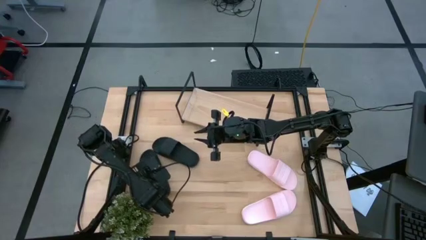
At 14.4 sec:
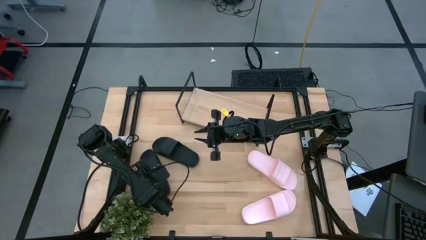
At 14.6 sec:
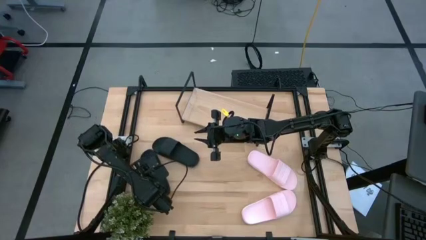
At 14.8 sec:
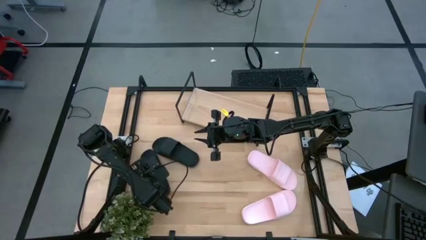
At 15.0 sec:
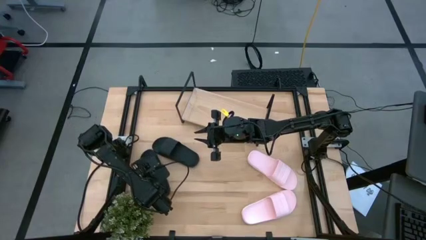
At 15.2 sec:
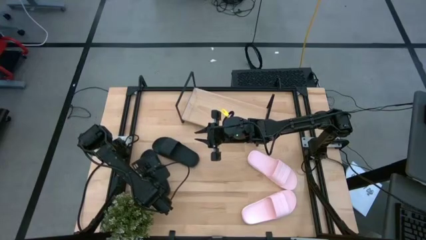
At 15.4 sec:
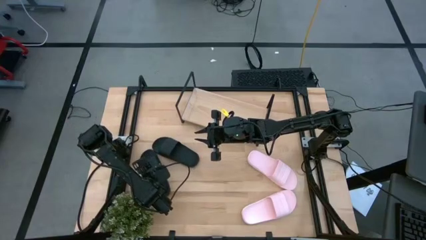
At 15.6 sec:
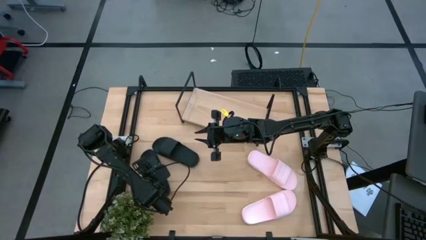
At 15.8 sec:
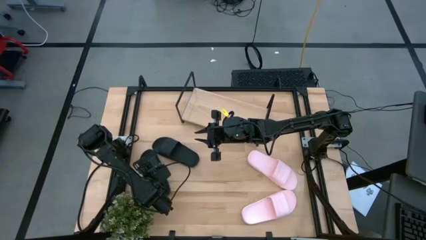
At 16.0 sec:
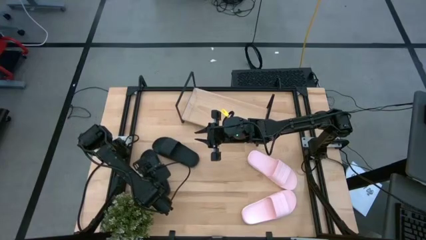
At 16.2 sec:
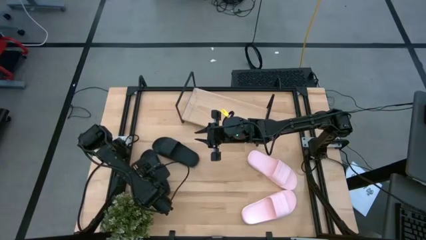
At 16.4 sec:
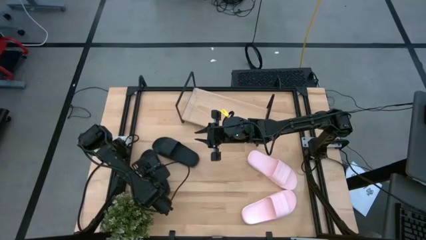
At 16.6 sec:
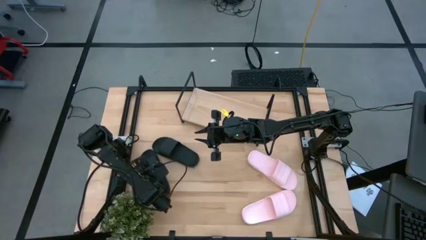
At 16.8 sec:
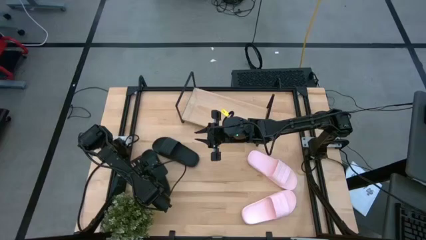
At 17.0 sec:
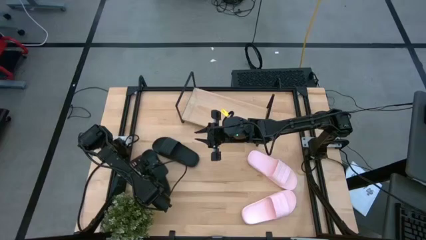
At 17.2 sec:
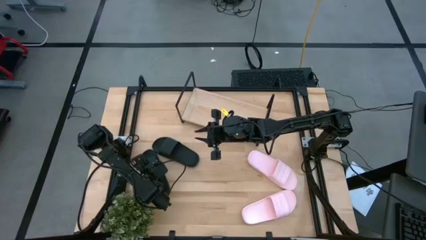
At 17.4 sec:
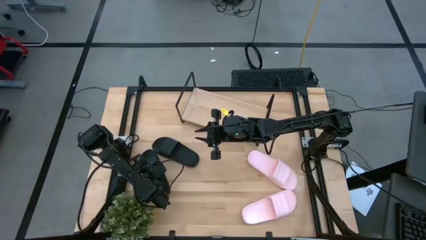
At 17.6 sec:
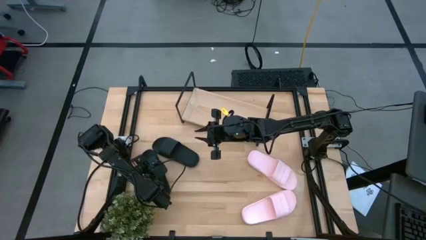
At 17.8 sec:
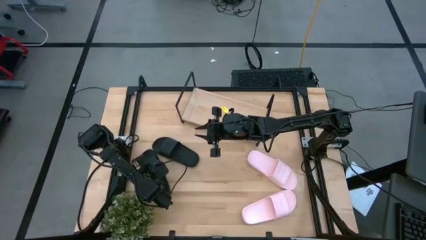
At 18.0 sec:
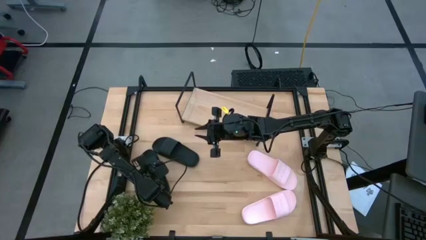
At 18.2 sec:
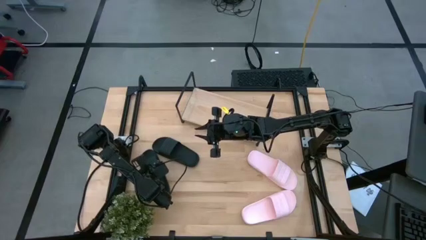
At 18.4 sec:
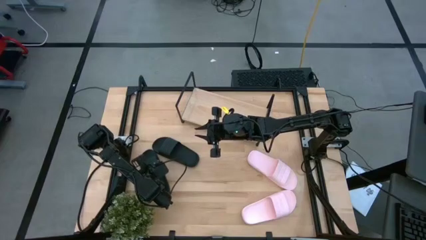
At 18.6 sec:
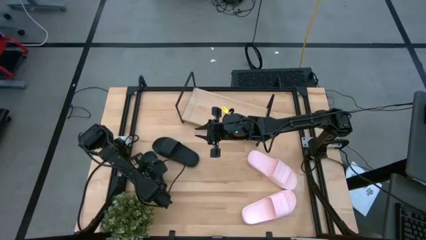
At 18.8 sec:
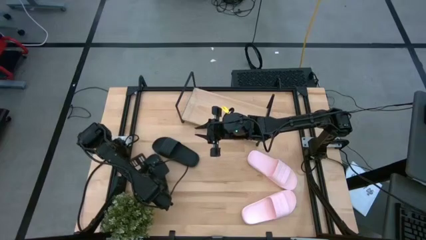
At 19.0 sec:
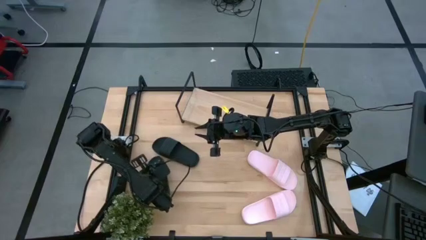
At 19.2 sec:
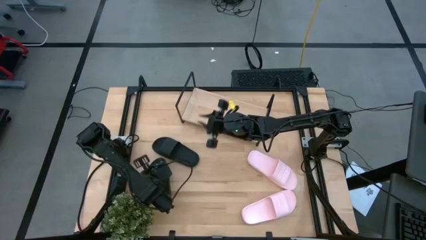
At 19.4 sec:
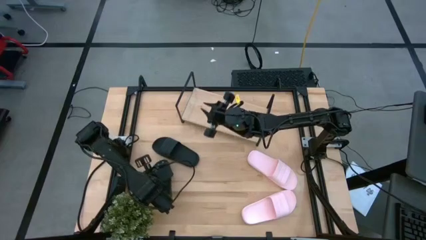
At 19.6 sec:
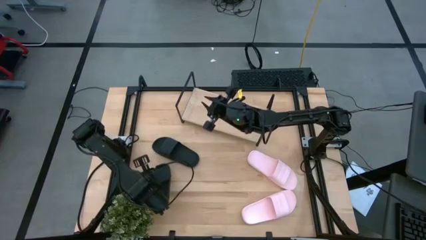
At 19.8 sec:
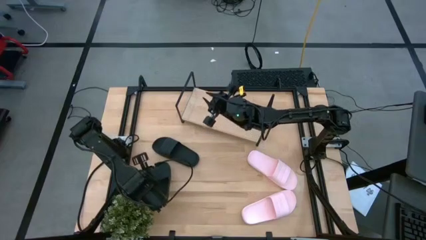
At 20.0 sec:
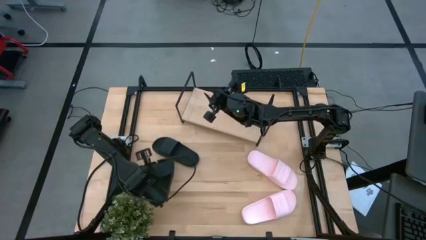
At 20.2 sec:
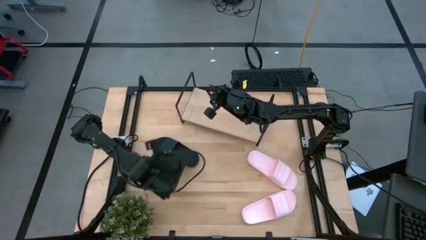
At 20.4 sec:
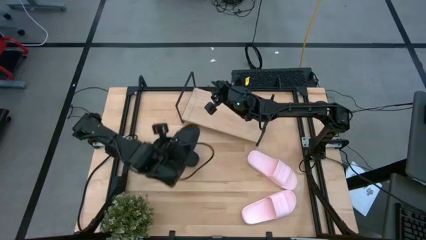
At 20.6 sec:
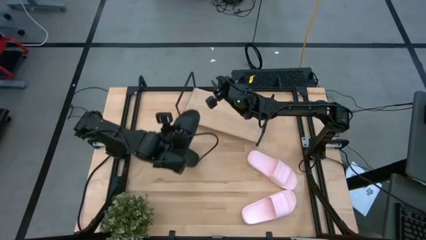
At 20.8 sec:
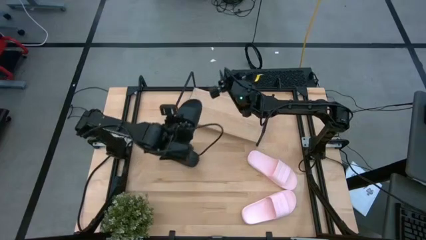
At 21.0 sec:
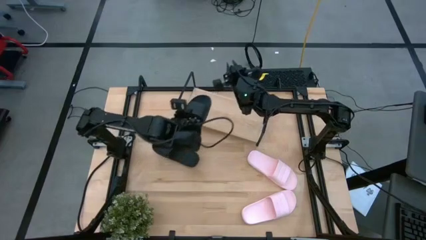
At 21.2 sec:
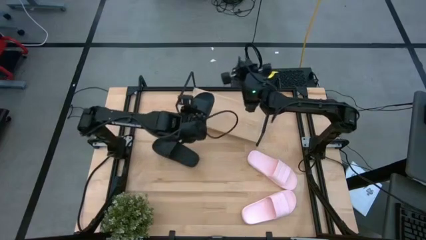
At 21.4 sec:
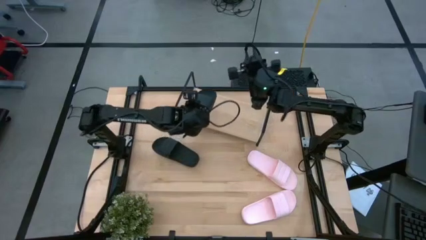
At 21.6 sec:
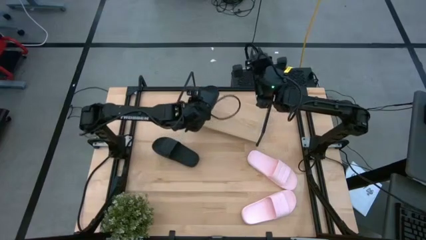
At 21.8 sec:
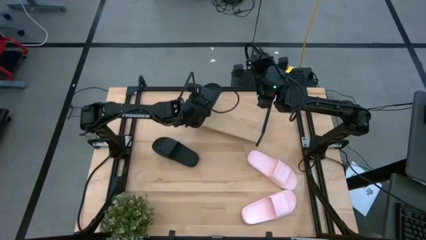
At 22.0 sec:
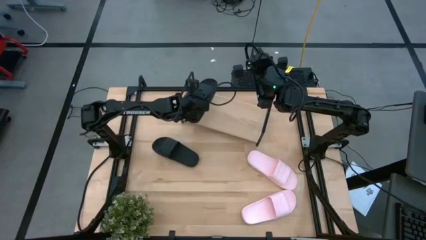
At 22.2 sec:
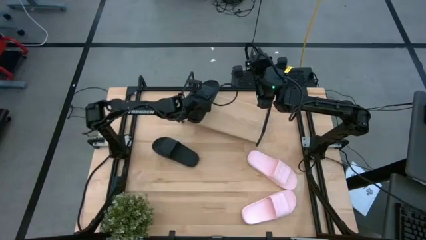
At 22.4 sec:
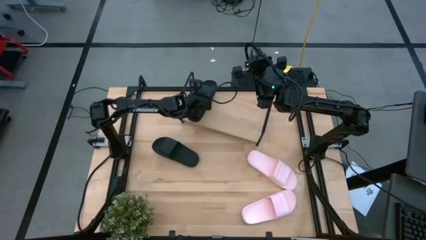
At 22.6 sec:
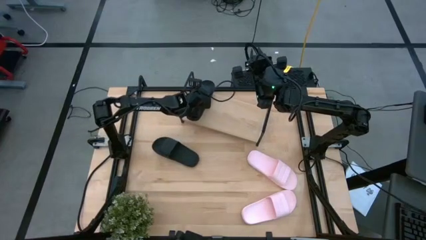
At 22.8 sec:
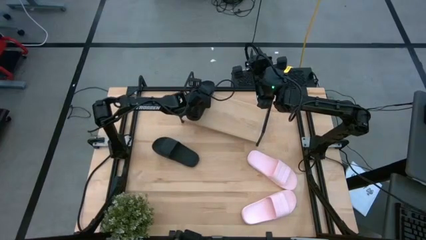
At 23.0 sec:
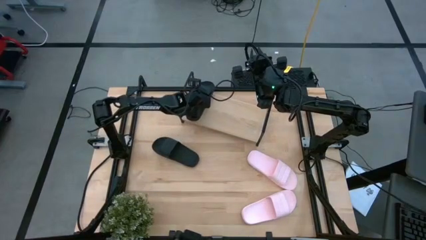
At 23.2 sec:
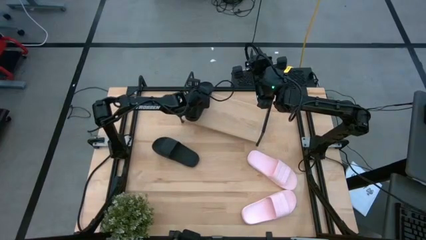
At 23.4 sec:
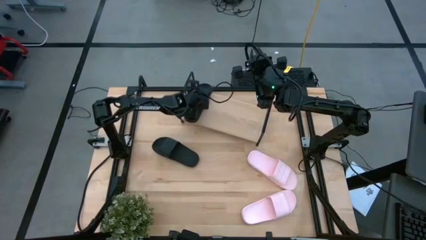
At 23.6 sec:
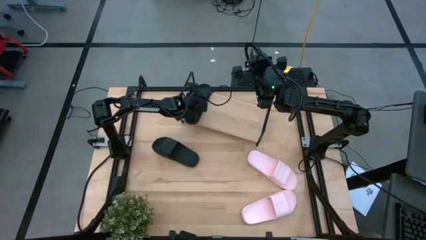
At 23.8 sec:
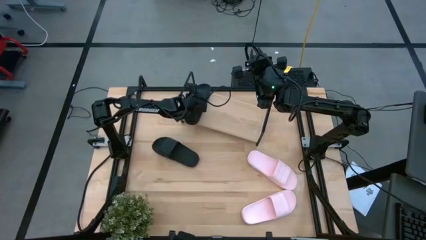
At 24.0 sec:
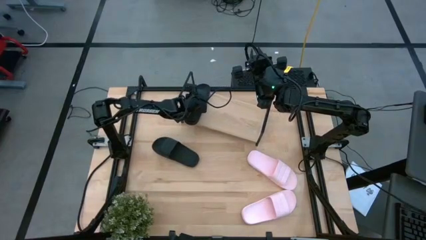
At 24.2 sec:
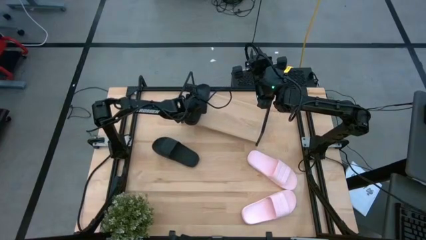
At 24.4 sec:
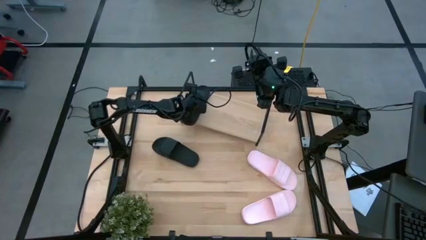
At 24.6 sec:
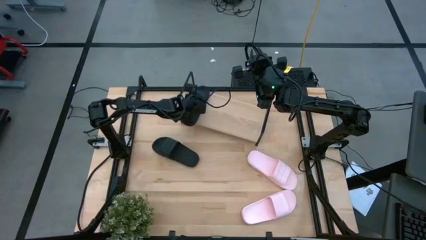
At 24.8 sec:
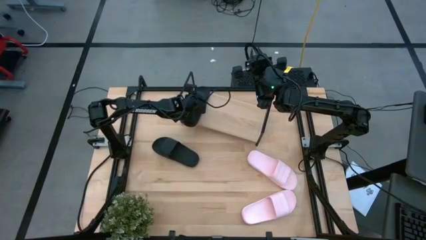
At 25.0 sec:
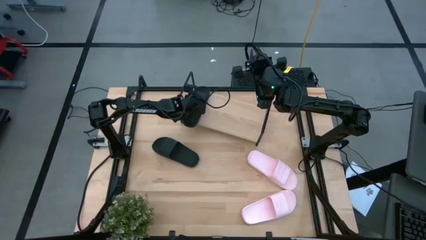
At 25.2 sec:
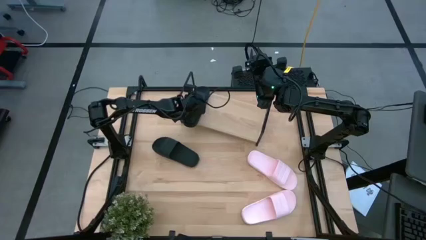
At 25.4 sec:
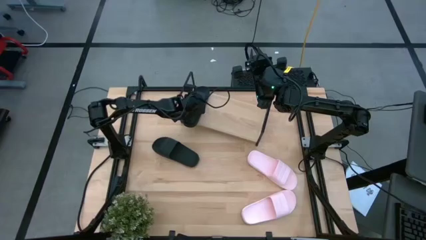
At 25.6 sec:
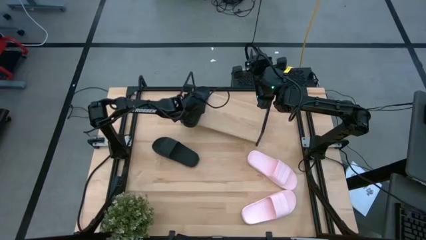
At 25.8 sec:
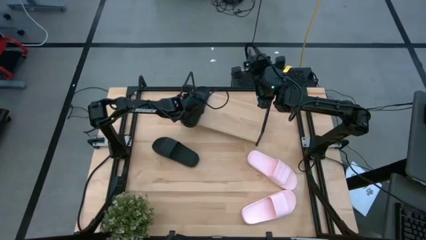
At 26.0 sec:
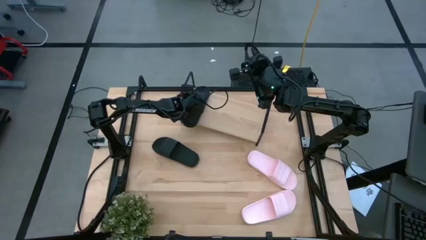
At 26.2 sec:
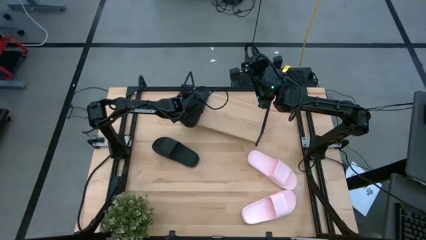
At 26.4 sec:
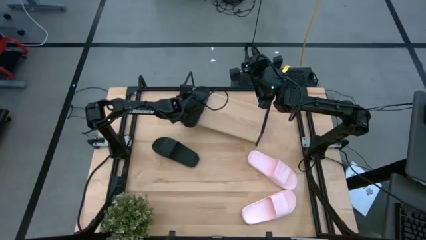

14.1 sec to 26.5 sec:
Task: Pick and place slides into the shelf
Put the bottom black slipper on the shelf
